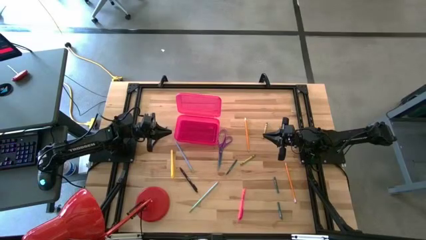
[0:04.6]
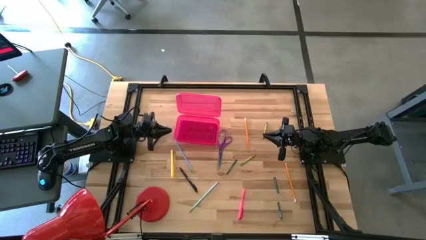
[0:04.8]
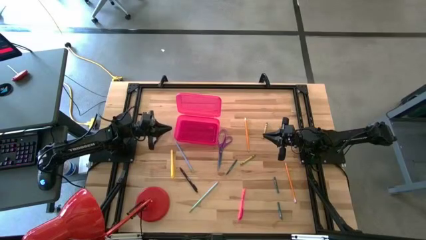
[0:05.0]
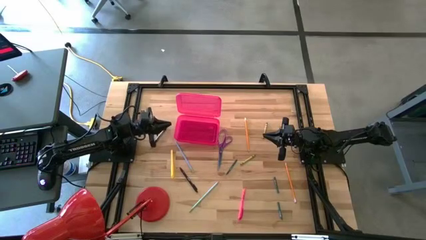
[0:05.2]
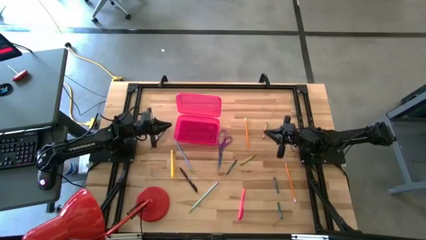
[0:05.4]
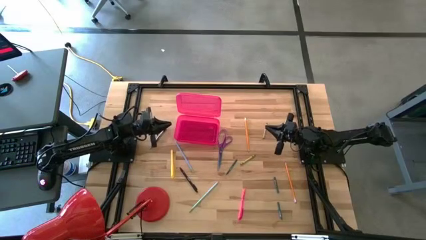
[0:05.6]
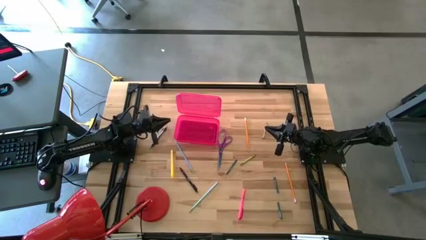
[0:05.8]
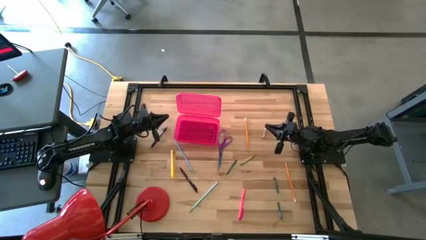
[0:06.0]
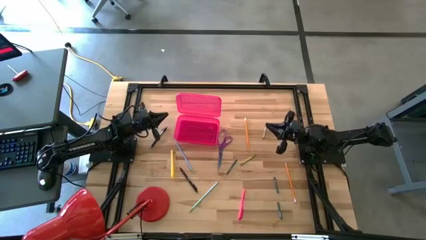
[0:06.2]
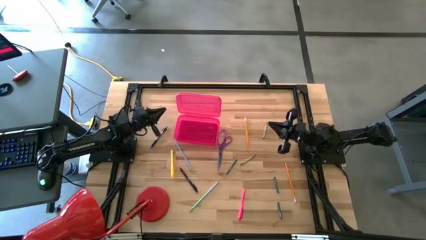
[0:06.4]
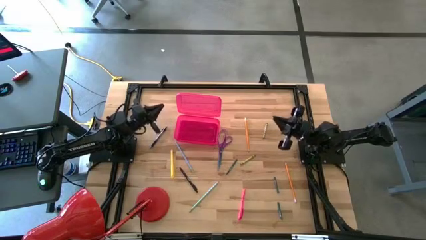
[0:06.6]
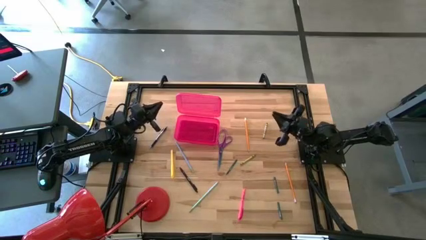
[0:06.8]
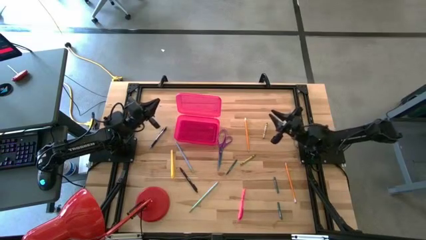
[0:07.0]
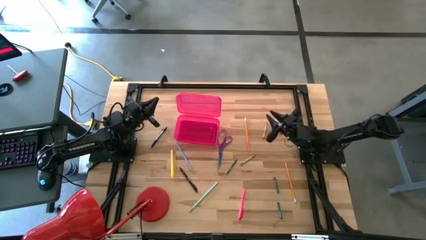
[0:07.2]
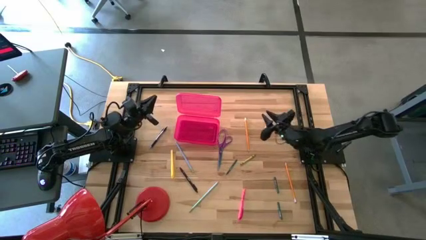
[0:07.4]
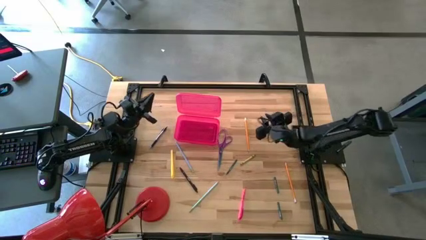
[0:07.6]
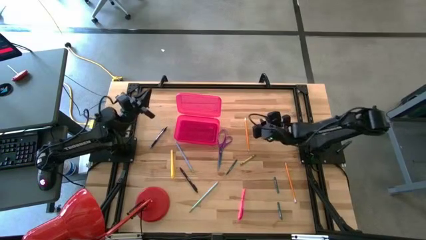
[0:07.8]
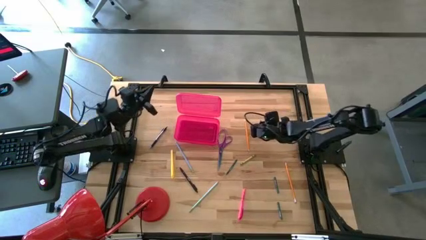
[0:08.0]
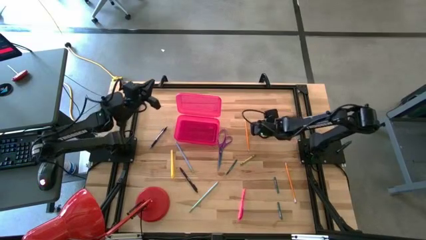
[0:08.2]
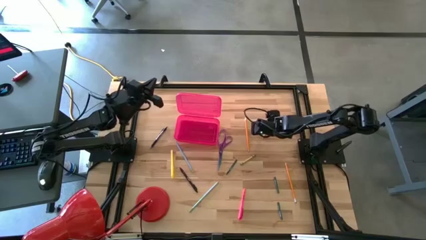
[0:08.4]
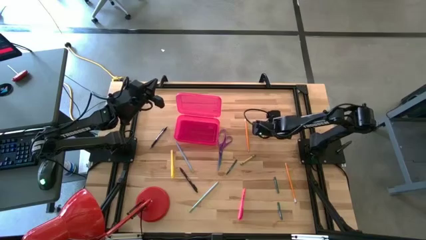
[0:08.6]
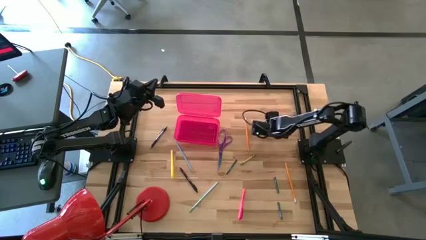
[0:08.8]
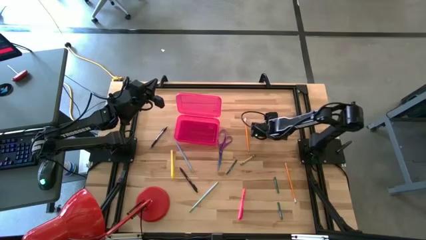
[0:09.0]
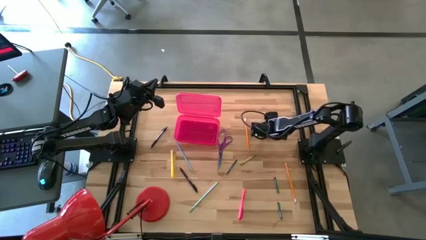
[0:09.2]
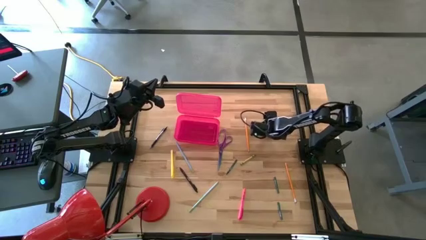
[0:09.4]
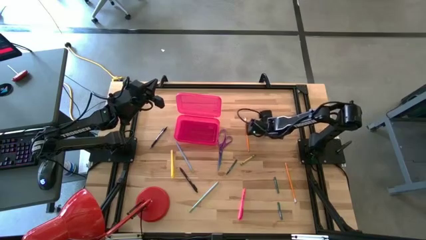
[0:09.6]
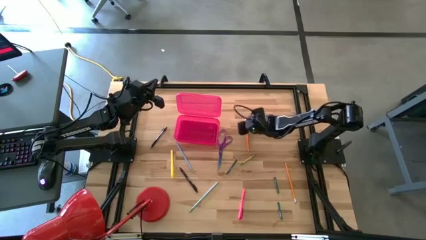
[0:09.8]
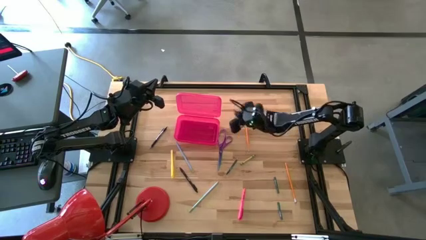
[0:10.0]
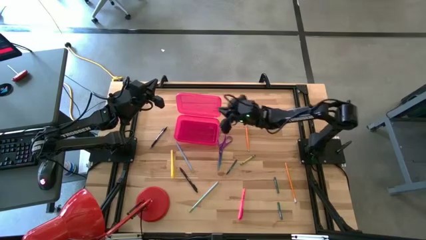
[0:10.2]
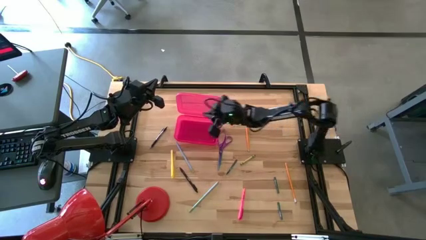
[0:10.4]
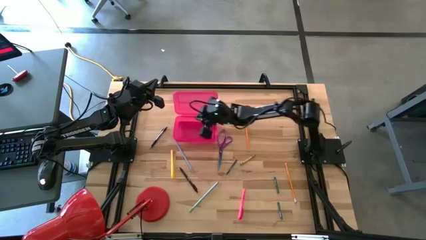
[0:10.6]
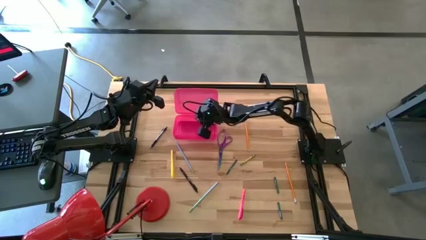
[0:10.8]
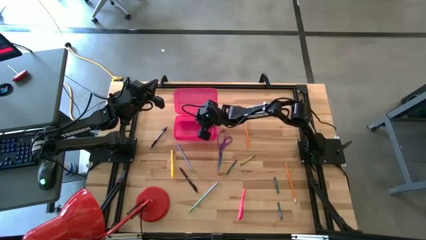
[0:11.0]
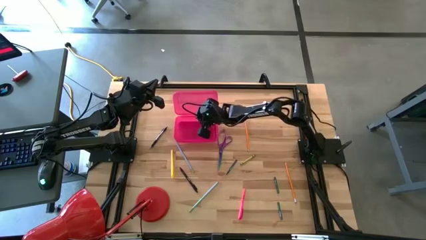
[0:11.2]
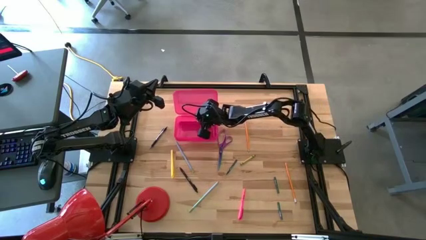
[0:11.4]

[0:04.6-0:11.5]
Task: Pick & place school supplies into a supply box
Put the top green crayon into the pink supply box

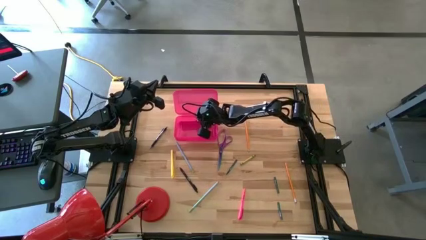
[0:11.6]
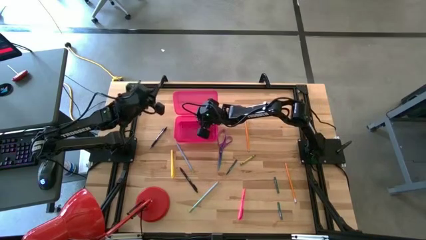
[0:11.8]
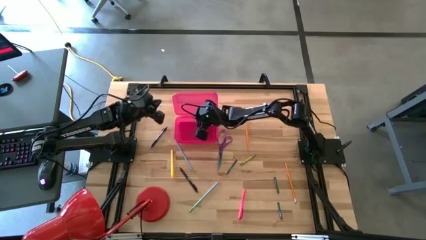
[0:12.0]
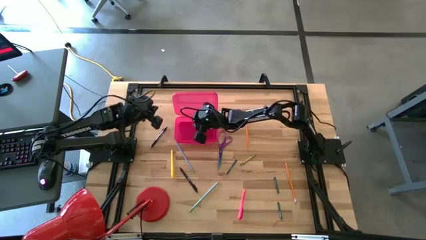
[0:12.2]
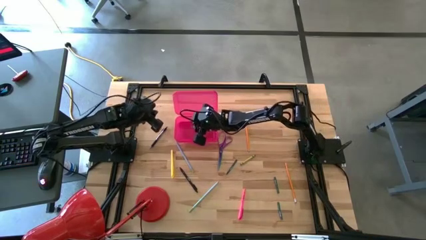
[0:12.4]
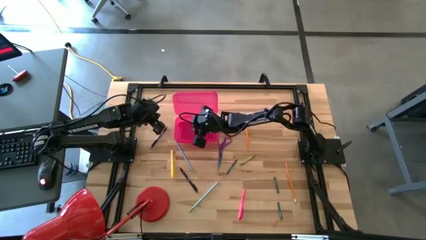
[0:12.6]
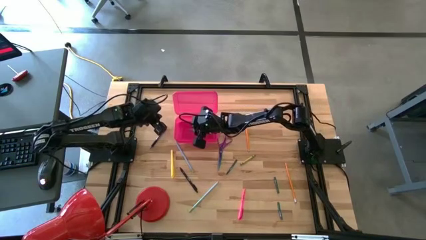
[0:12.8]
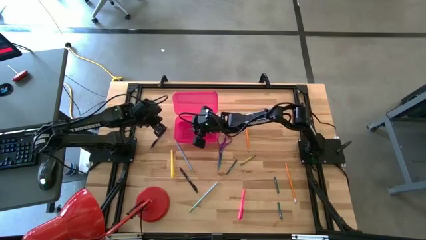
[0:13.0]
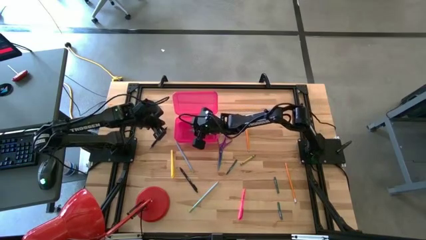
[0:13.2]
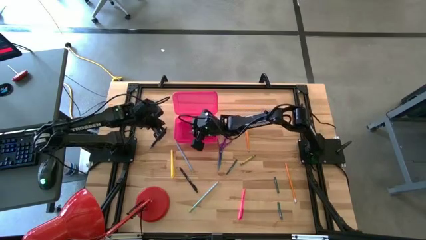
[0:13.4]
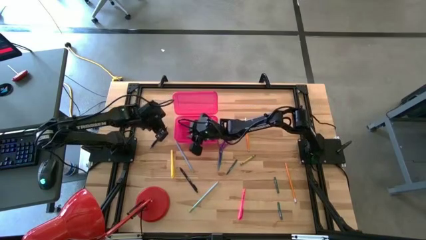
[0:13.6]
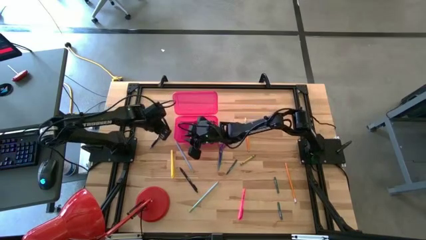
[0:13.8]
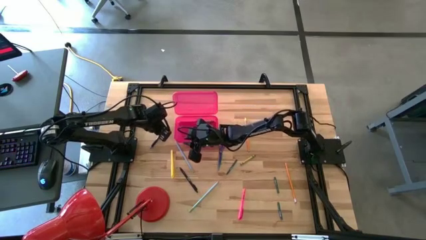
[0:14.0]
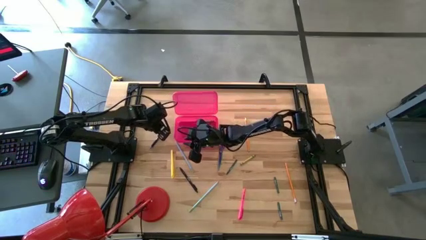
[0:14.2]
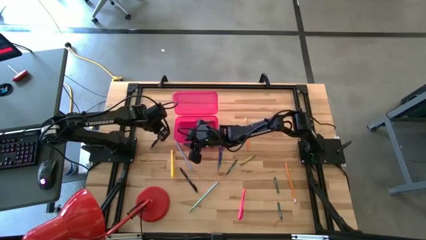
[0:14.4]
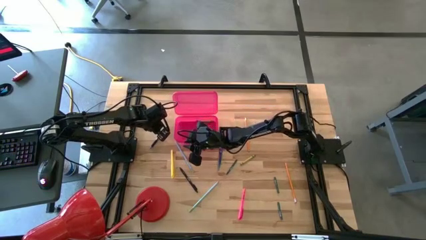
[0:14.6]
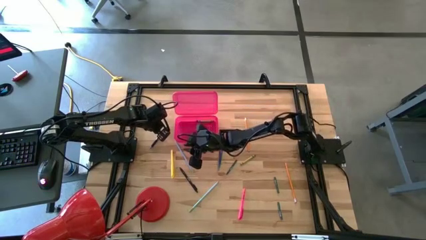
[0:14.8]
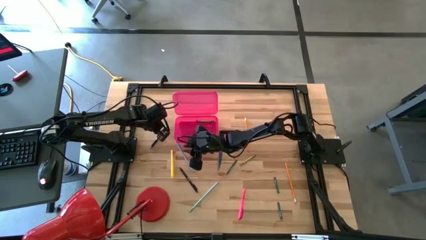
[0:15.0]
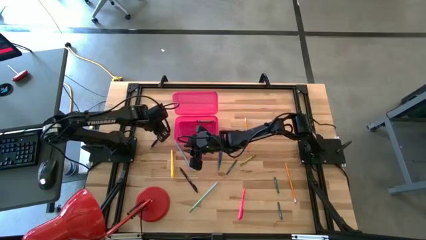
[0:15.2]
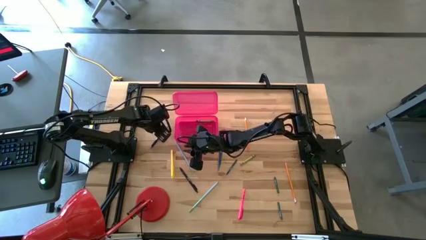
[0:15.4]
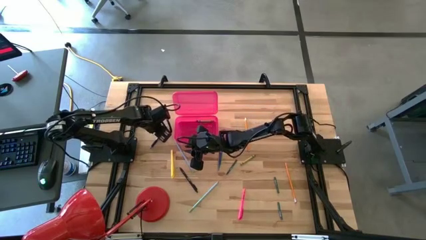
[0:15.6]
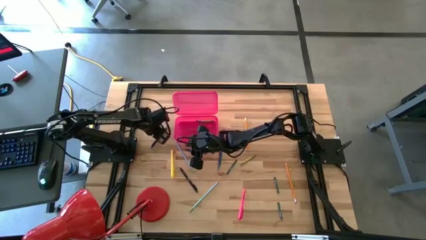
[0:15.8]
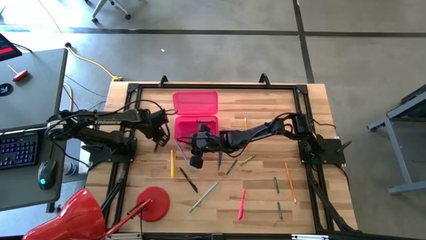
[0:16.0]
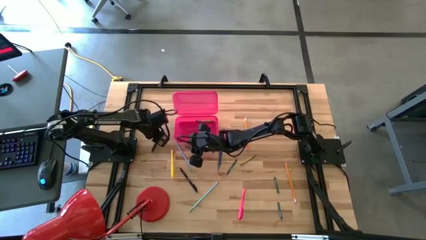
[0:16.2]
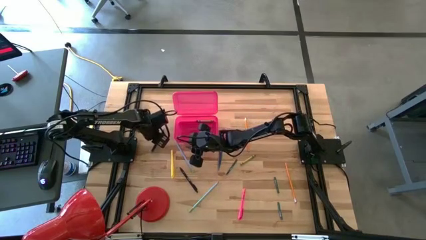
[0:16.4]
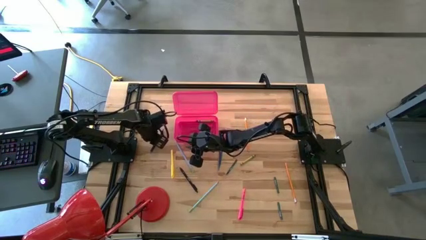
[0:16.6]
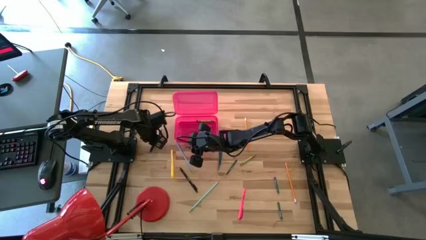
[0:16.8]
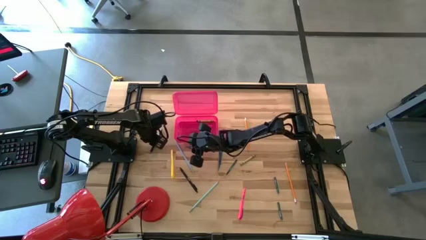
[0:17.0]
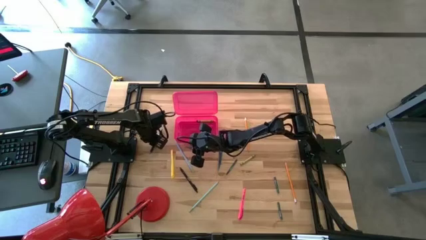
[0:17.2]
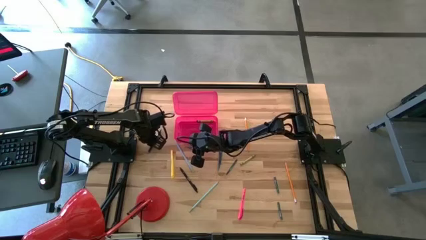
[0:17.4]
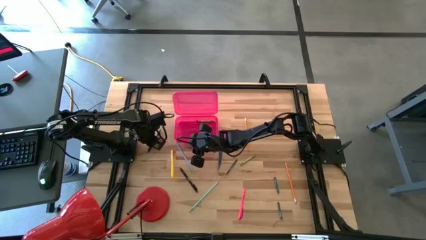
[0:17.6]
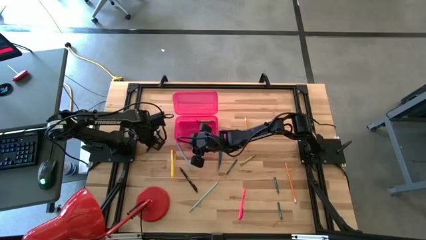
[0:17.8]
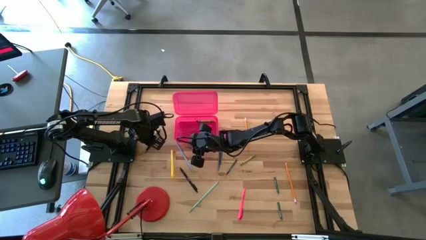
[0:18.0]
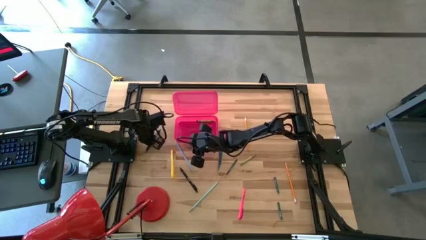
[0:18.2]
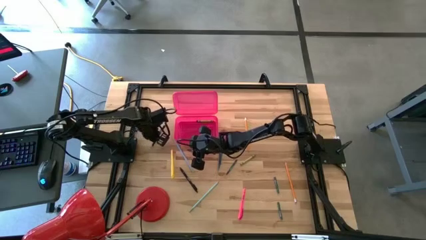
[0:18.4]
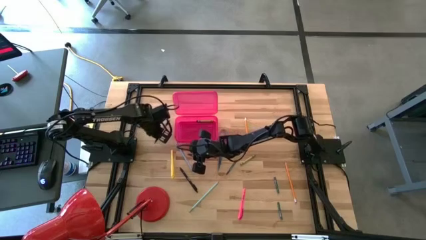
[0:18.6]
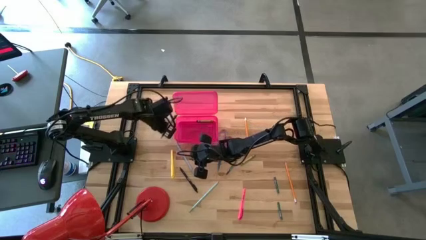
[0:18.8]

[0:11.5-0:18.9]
Put the top black pen into the pink supply box

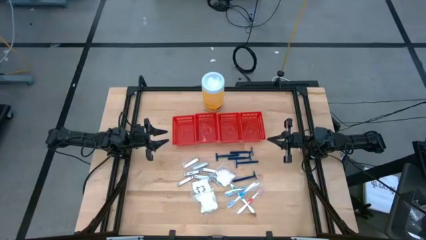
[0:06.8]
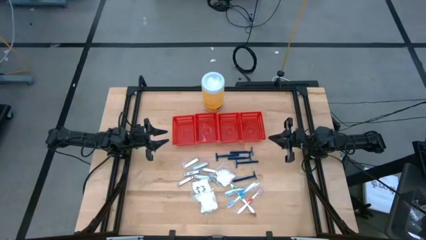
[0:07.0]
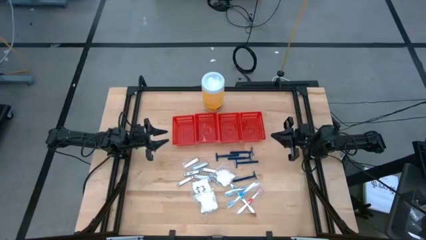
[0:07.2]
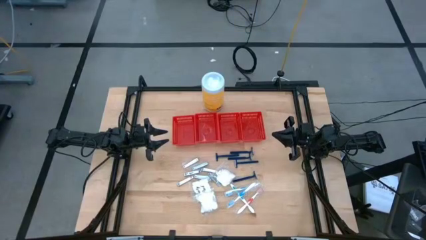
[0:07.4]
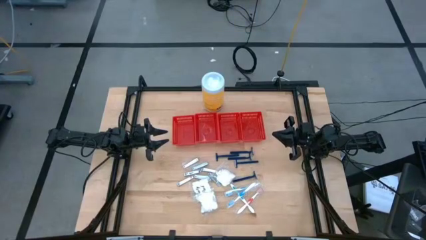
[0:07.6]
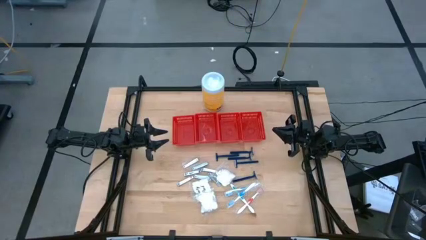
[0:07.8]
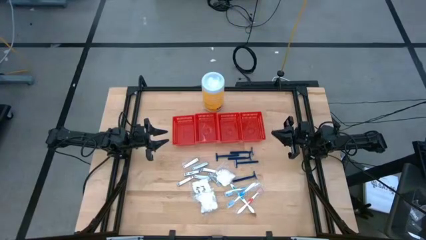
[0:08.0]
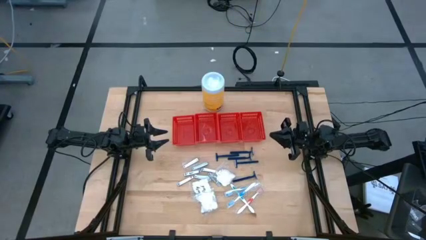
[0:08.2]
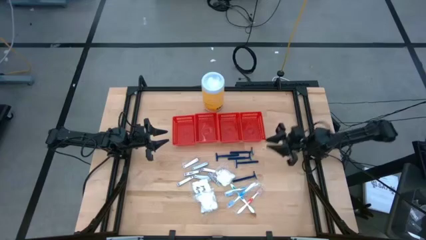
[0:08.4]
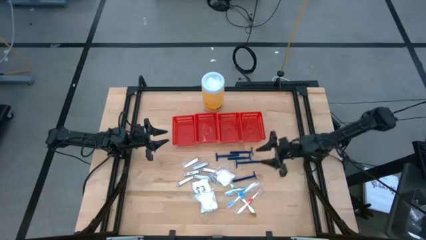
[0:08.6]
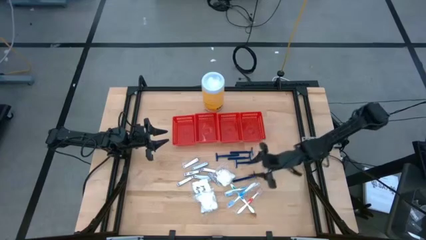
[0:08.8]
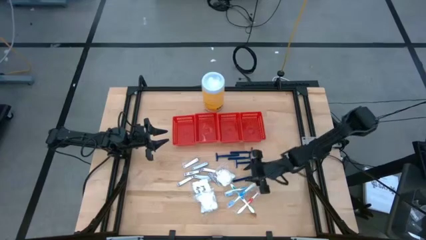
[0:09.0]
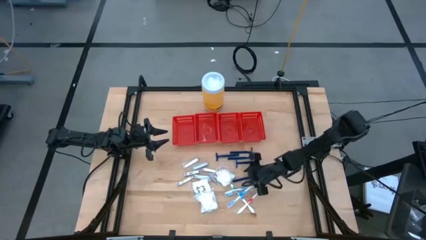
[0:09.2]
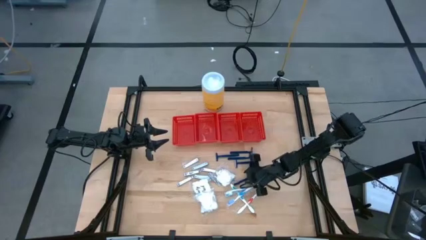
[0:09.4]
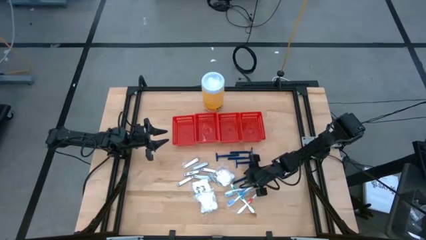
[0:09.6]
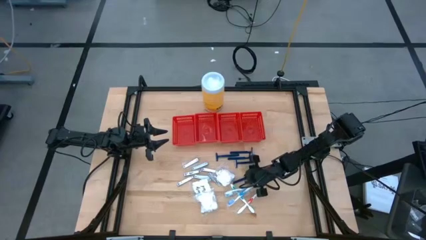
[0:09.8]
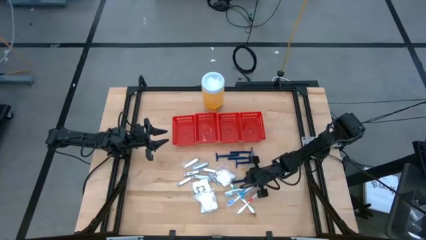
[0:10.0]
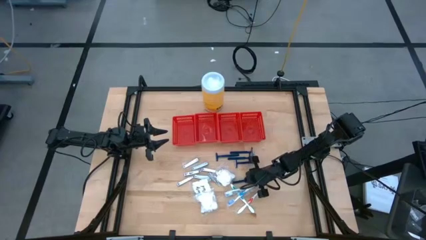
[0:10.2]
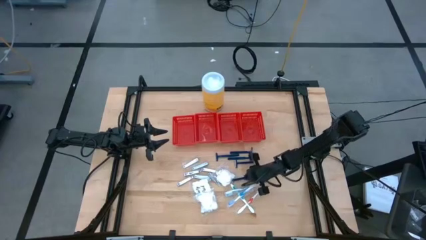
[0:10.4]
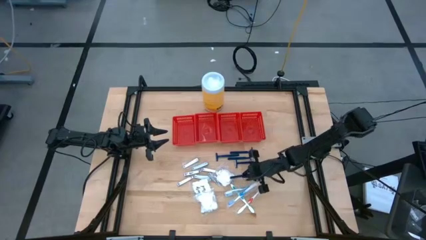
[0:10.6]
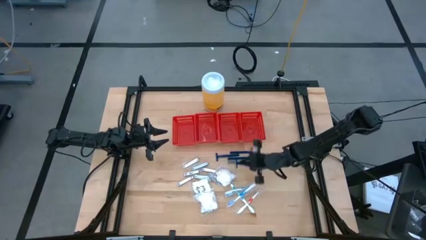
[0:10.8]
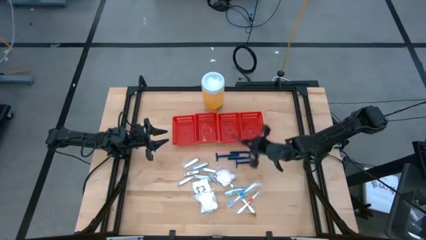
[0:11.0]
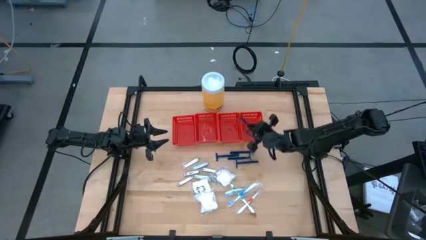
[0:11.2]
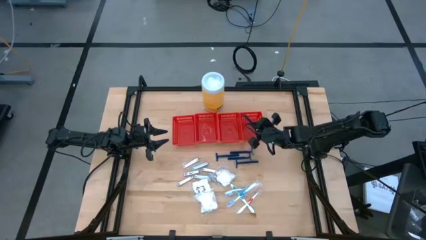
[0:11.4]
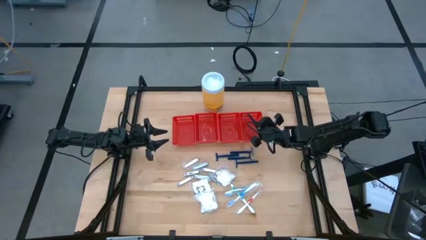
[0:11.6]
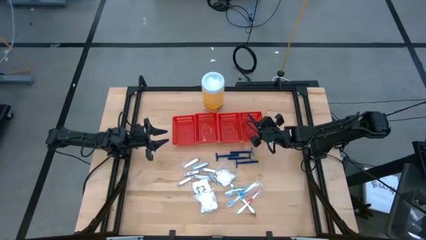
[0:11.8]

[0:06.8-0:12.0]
Task: Pick & Place Travel size toiletries
Put the blue razor into the right red basket
